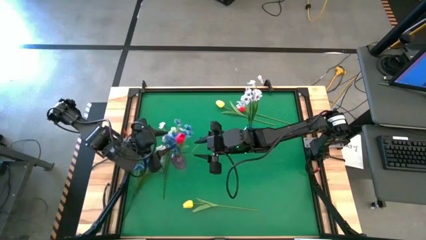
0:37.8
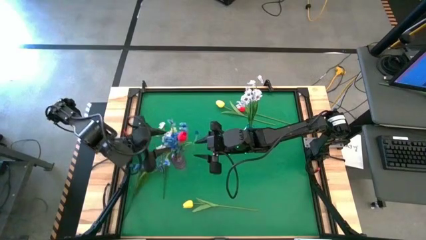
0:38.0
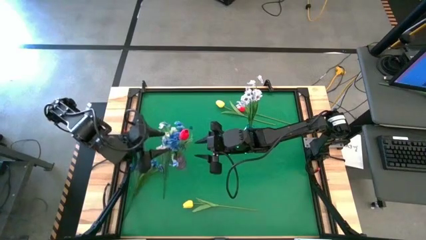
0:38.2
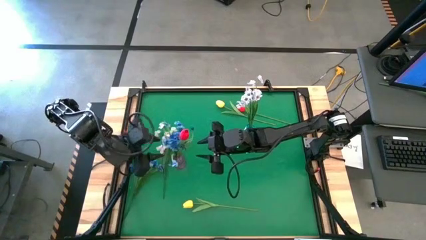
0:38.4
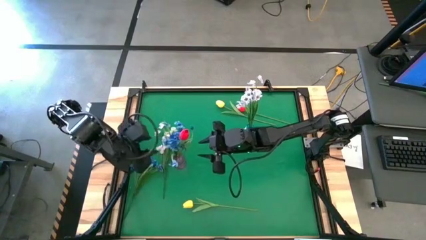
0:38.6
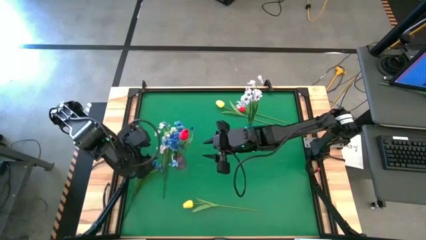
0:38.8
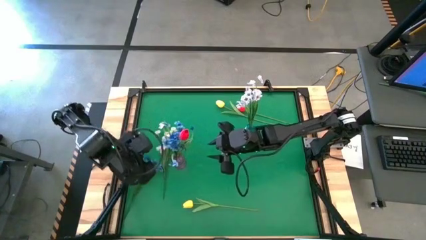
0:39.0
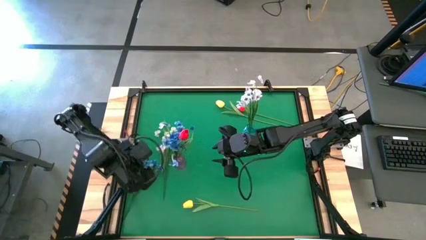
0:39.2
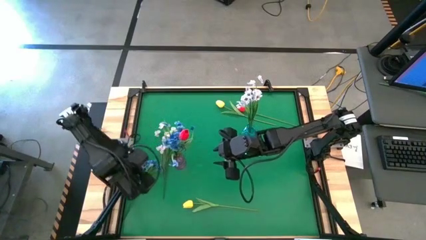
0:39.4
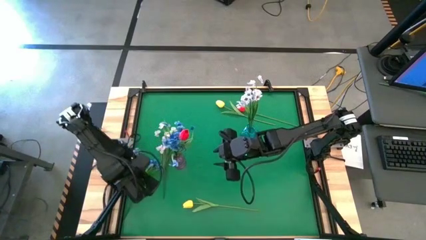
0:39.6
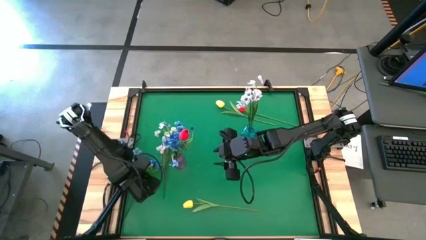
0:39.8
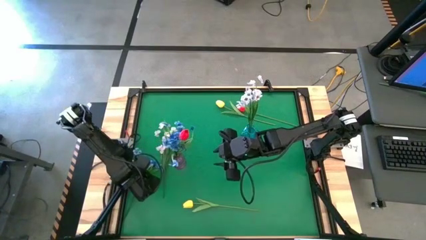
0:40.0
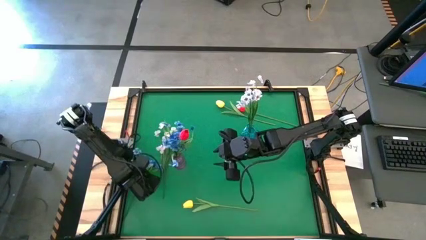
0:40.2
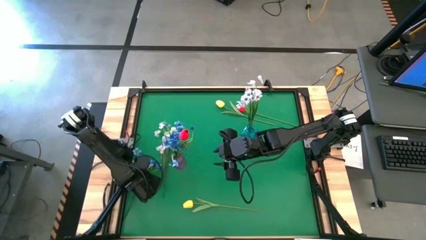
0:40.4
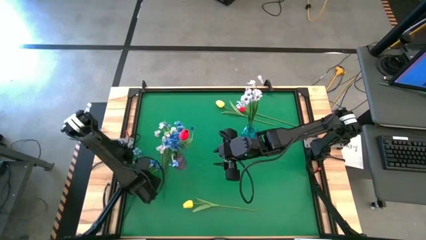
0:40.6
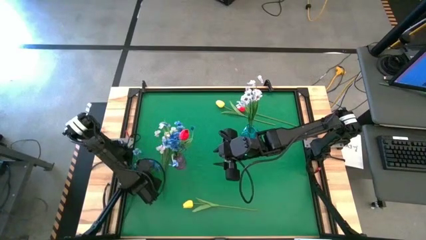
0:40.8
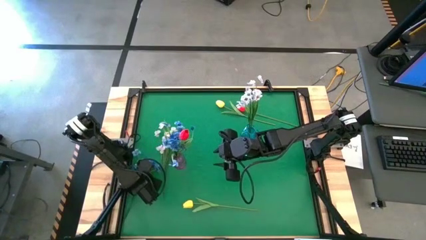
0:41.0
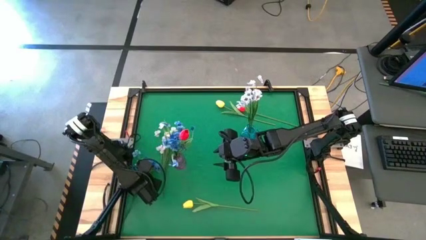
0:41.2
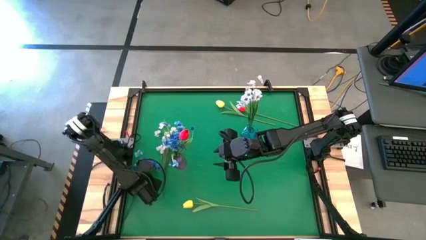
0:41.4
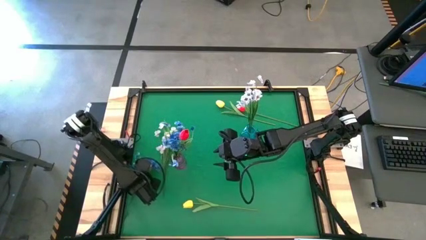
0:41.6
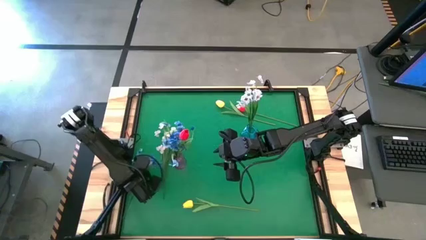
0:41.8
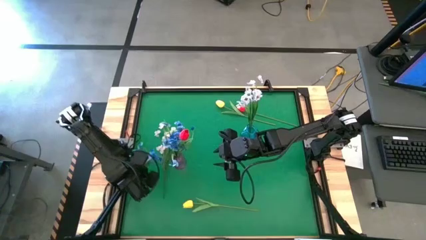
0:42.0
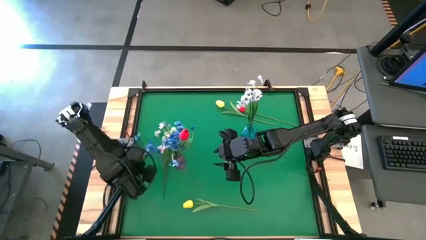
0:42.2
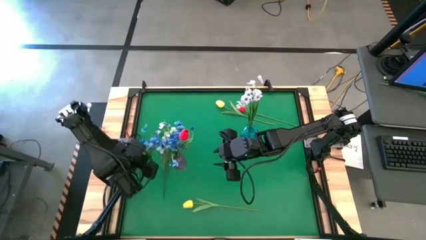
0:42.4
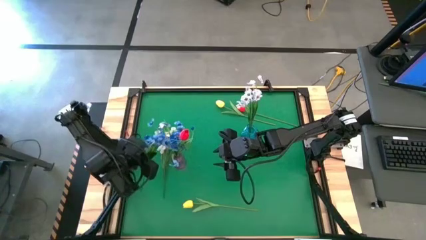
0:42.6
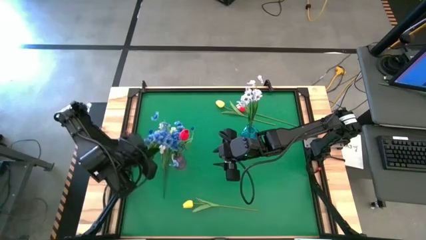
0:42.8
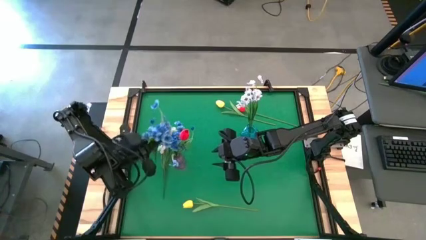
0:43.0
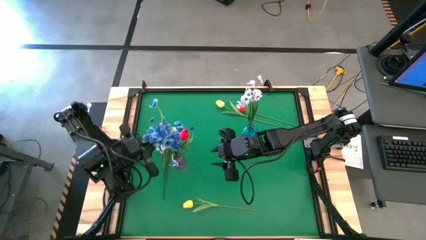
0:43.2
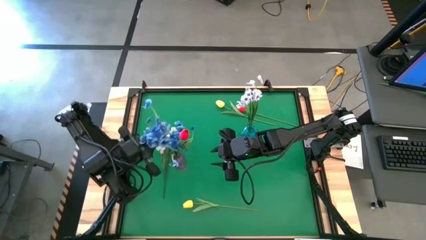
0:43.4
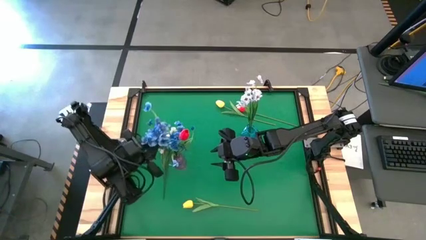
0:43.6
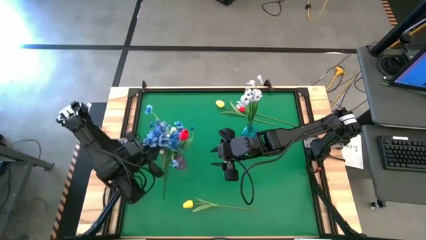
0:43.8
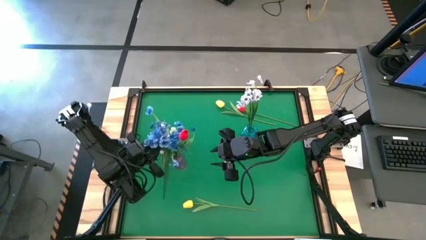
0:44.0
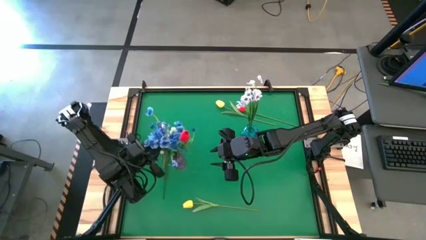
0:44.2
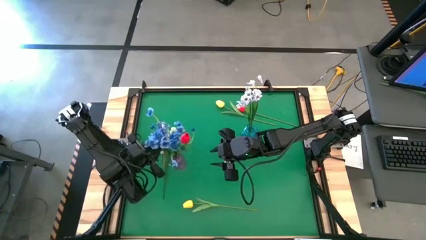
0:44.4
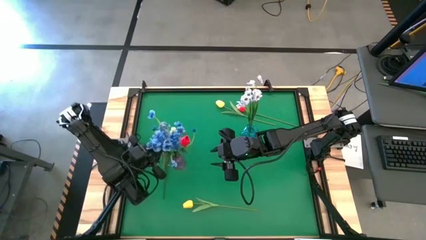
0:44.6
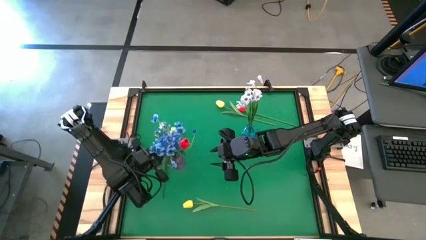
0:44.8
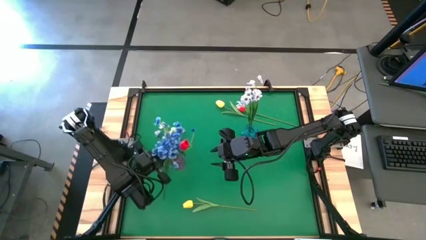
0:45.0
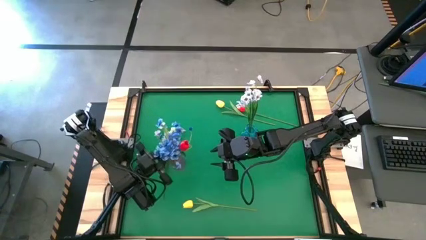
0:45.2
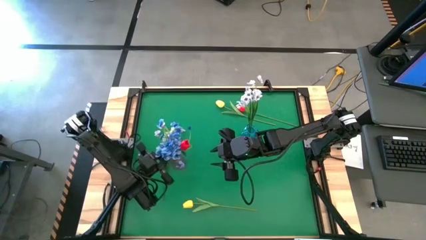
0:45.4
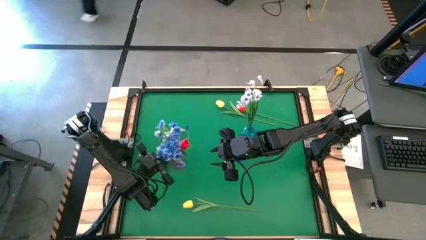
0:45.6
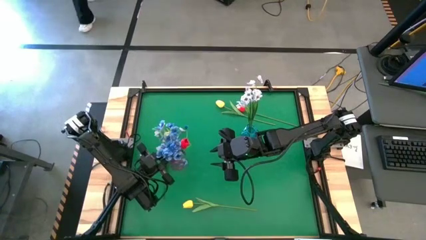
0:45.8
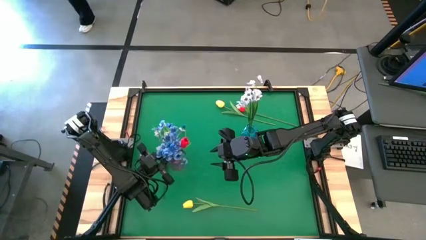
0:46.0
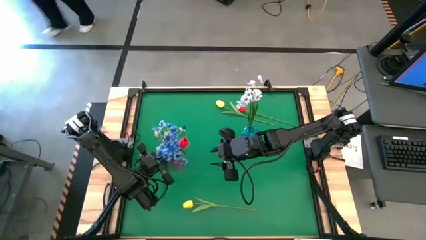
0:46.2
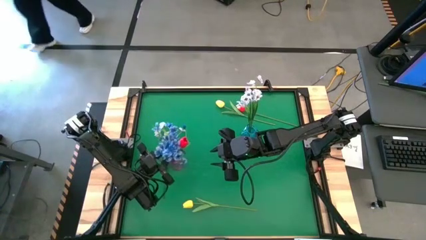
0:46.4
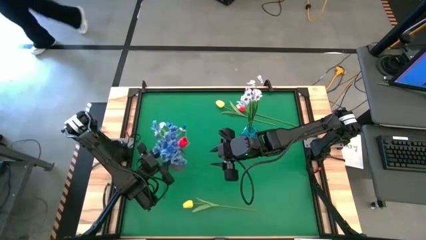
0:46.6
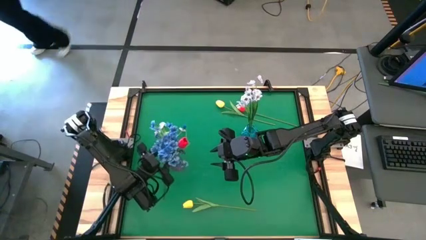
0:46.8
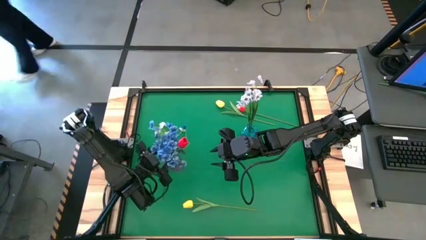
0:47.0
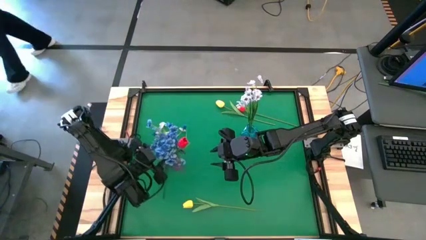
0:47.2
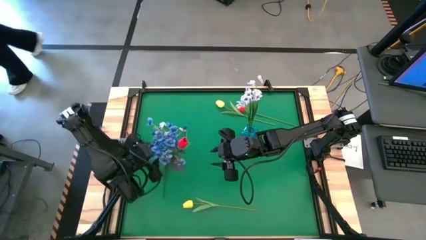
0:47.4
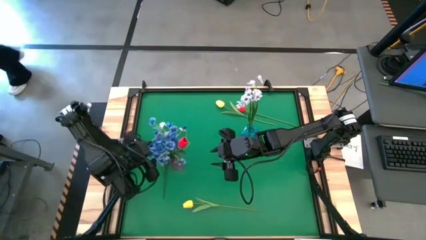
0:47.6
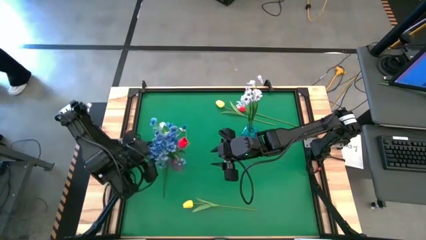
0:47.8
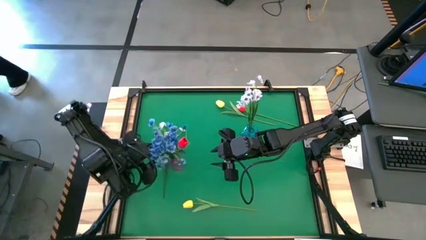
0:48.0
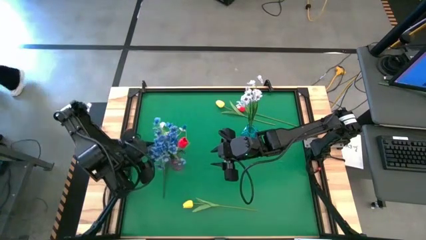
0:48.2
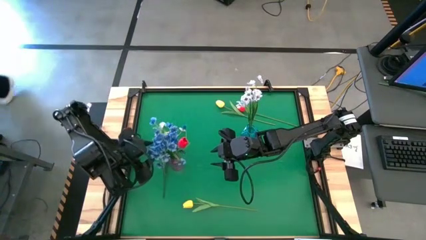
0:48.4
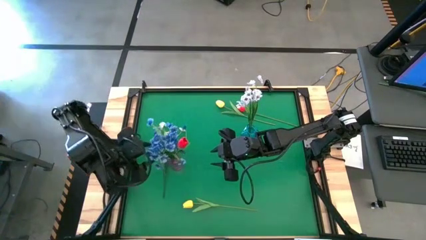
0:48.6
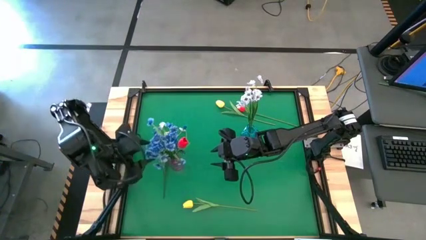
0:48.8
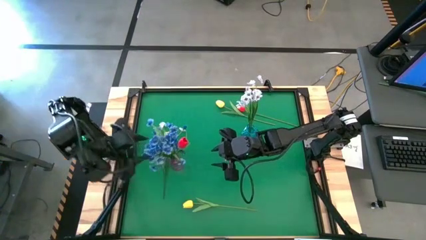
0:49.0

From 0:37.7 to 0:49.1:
Task: Sort flowers into vase by color
Put the blue flowers into the violet vase
